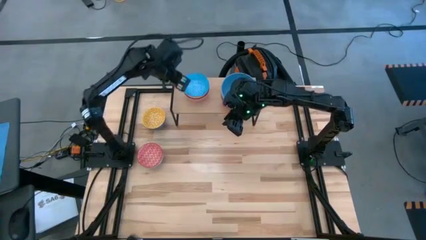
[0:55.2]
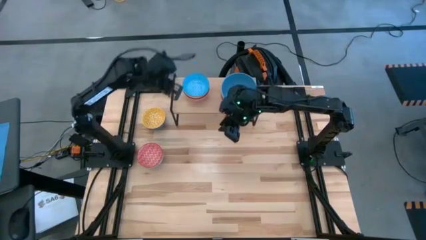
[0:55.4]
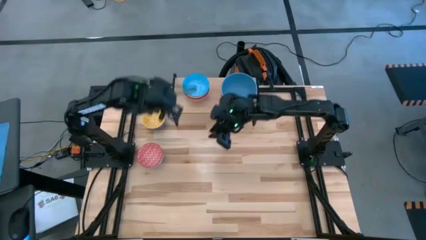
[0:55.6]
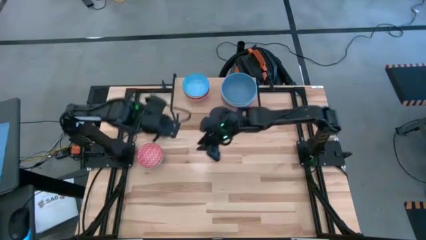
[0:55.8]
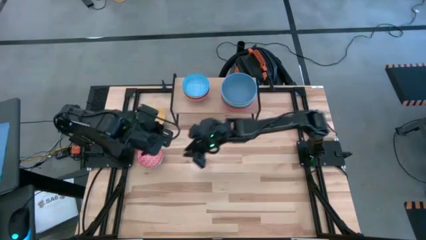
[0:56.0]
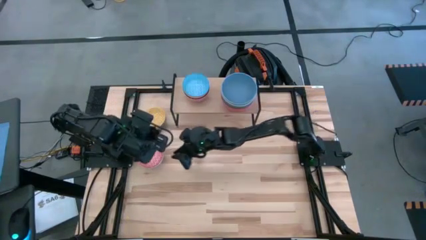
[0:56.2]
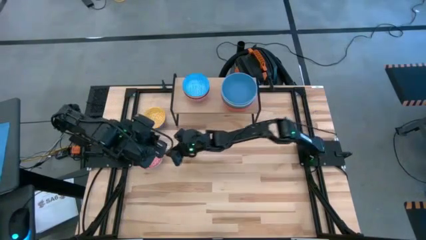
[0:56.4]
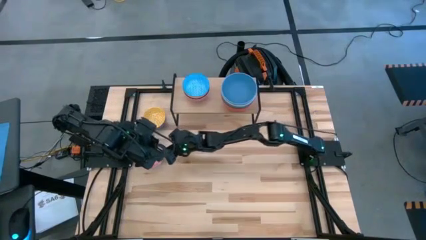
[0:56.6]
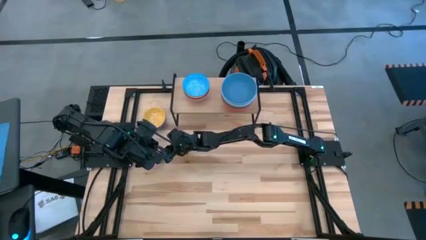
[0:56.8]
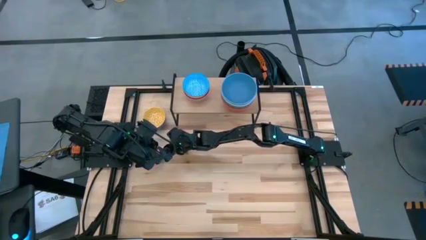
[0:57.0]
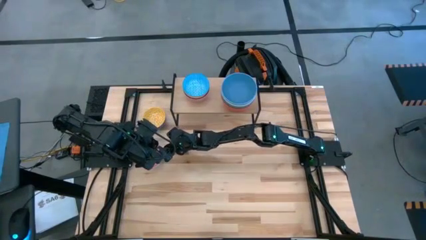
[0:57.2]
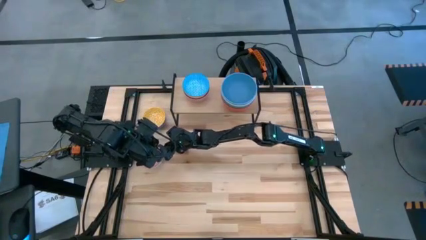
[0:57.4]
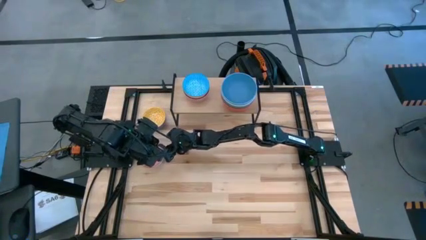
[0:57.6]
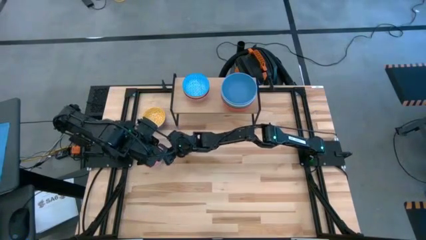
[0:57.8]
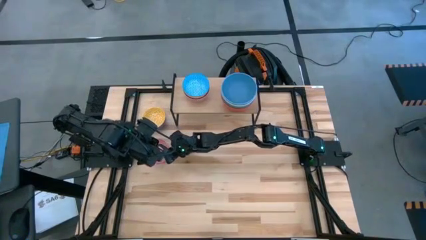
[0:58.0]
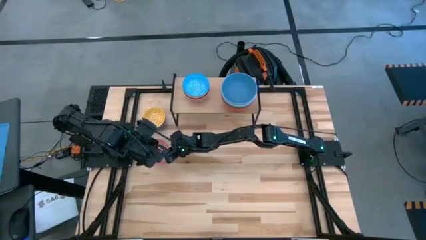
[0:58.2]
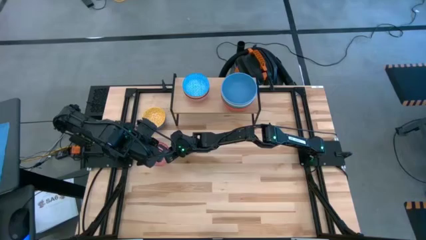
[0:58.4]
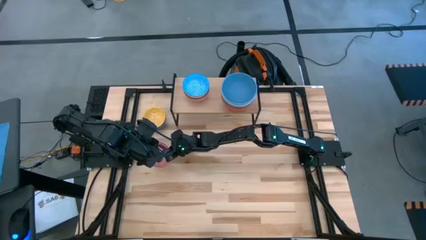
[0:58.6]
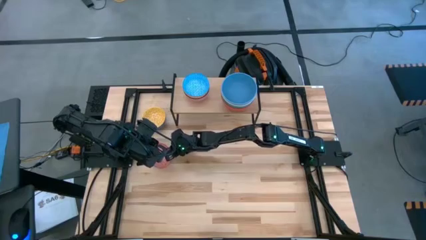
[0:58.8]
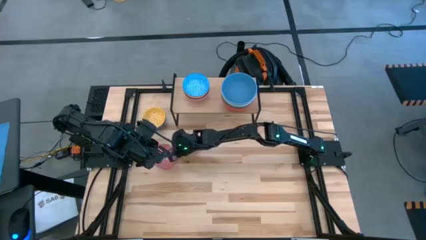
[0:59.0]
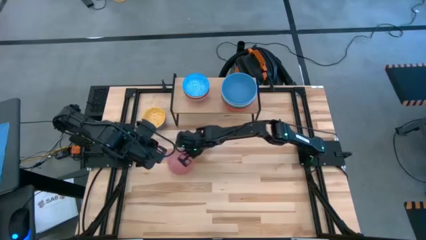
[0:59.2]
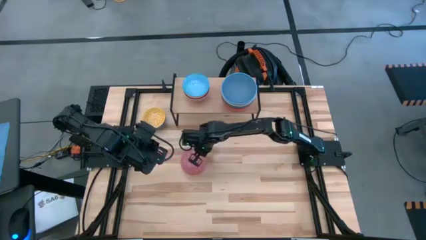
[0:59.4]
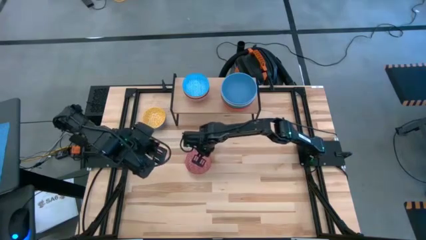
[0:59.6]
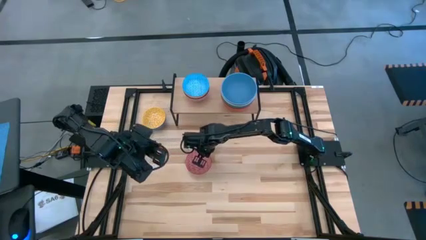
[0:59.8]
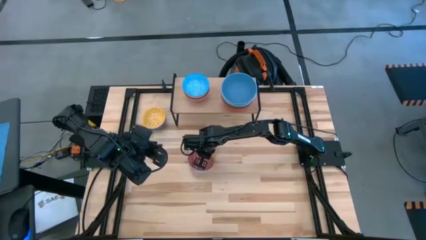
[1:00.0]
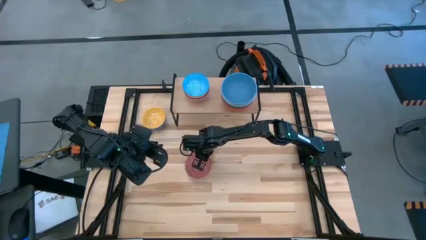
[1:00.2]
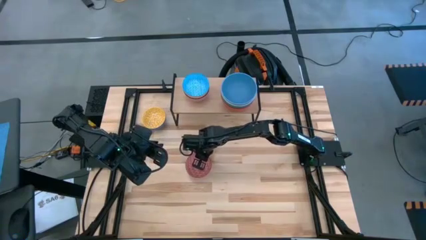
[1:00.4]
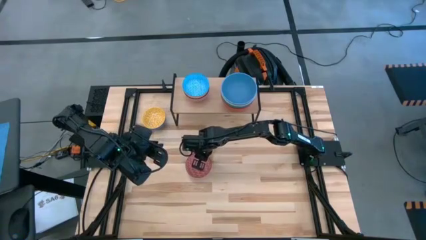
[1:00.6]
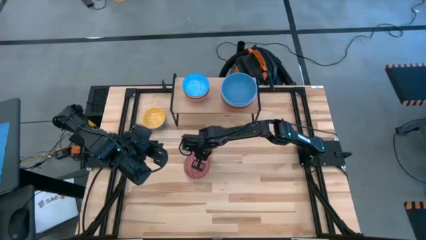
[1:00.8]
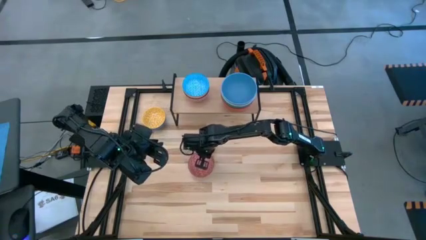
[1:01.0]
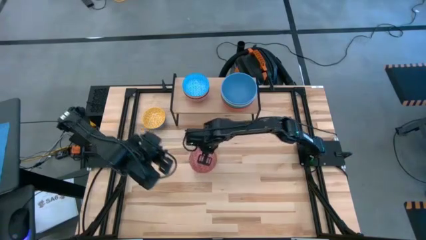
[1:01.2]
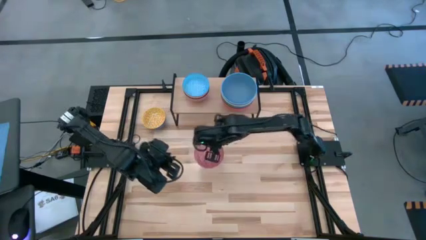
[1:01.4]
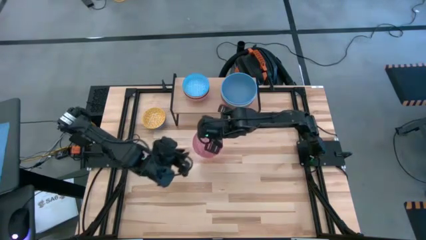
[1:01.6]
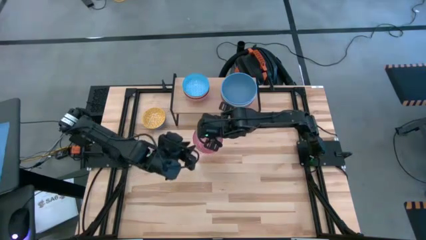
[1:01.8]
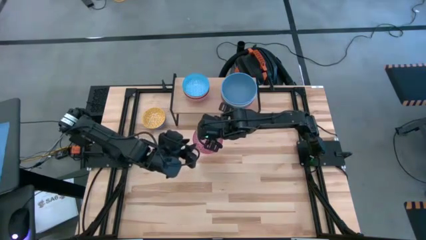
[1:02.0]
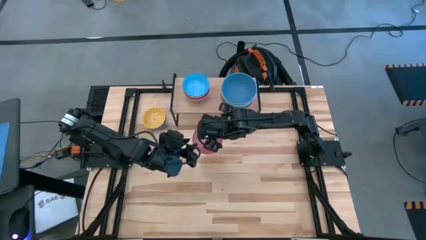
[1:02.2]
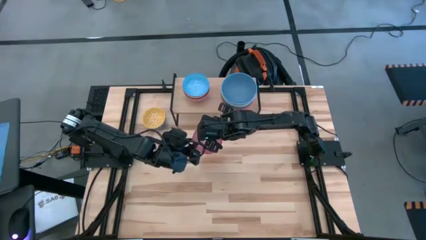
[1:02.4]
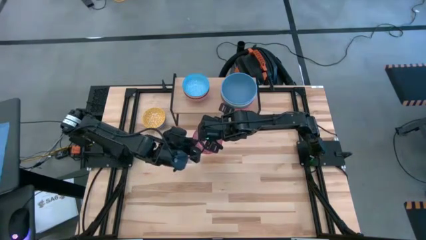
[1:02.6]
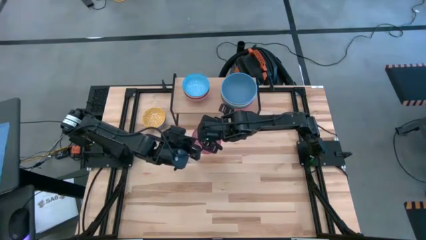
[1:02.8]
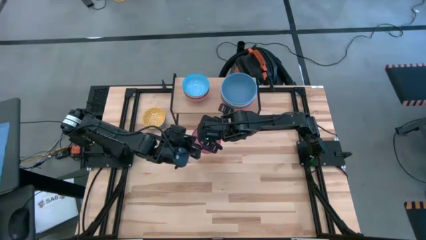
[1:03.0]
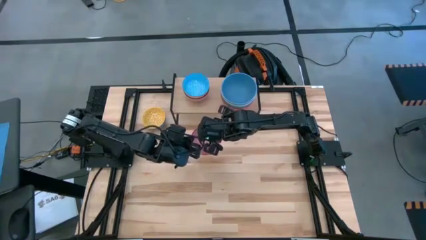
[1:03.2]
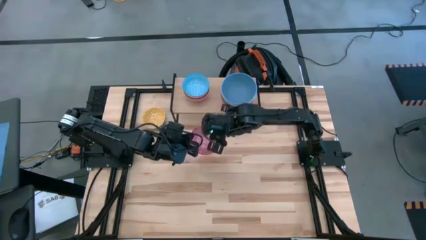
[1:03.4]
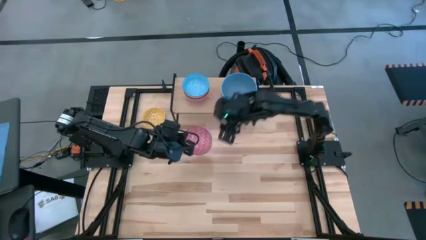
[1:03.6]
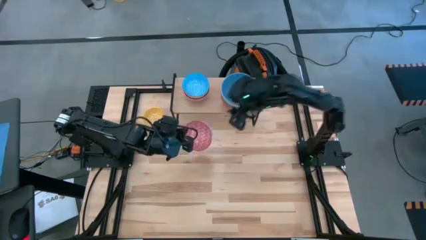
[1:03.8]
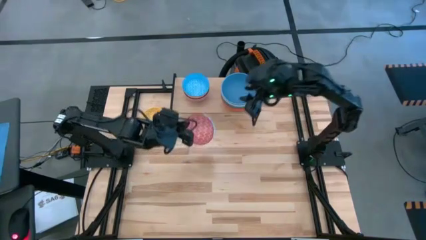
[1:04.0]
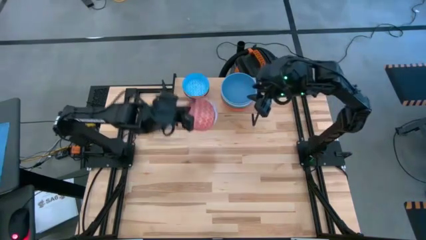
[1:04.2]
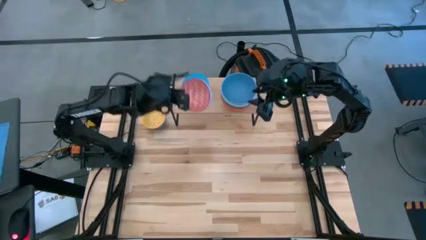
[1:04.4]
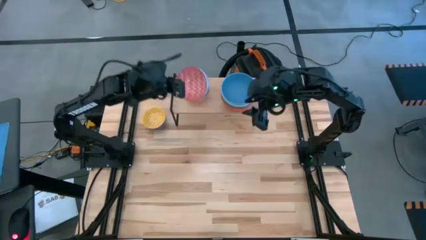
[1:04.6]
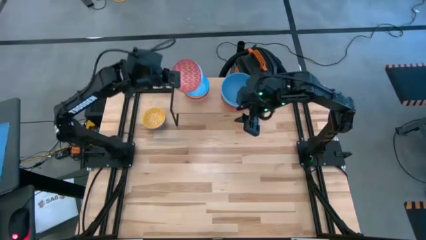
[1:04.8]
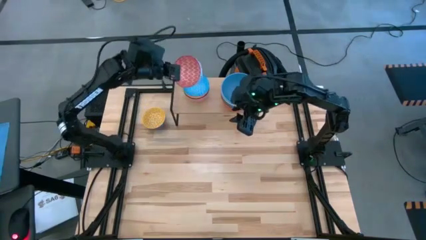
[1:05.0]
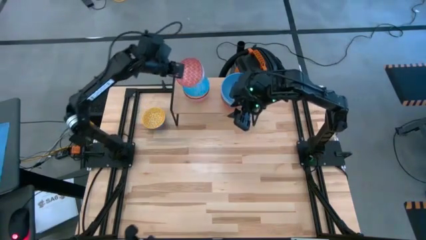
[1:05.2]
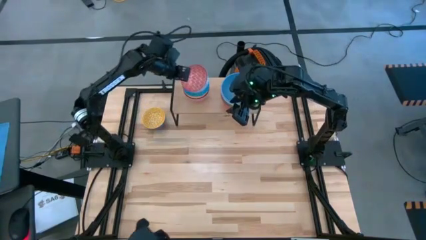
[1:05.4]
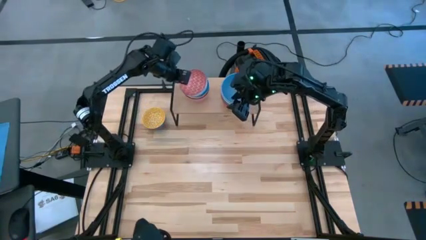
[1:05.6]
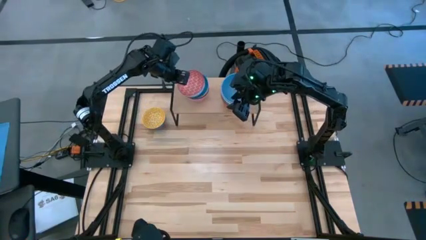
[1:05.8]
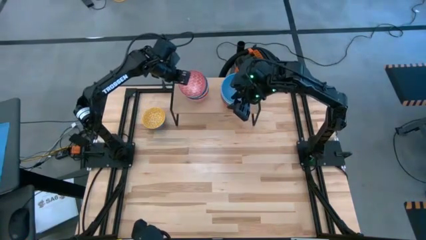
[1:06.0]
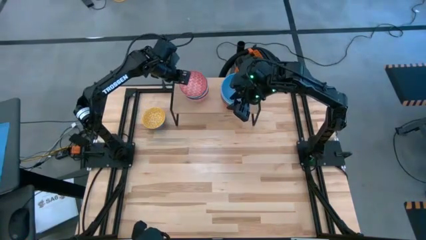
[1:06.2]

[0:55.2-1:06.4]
Task: Place and stack bowls onto a shelf
Stack the blue-red patterned bowl on top of the yellow-blue patterned bowl on the shelf

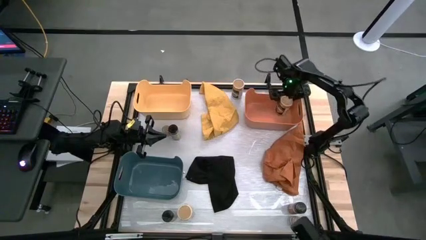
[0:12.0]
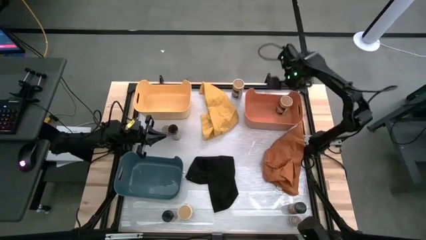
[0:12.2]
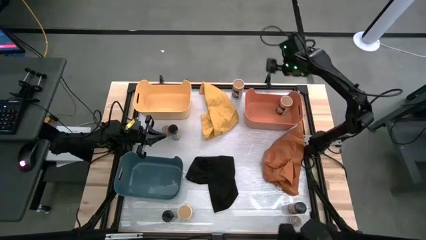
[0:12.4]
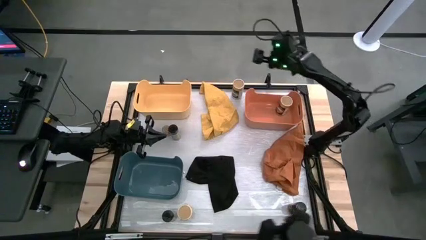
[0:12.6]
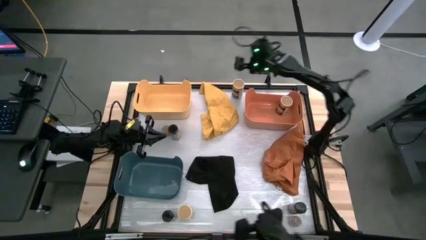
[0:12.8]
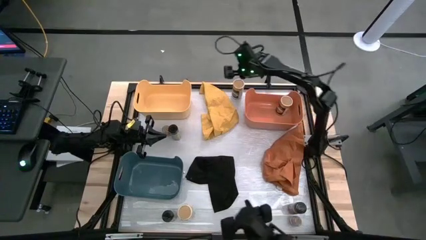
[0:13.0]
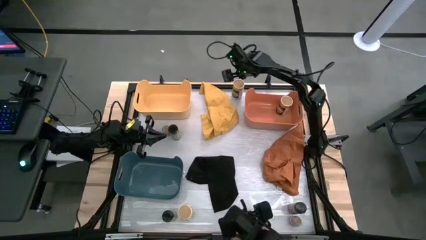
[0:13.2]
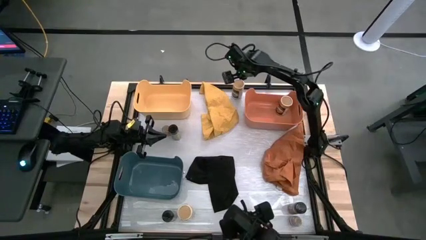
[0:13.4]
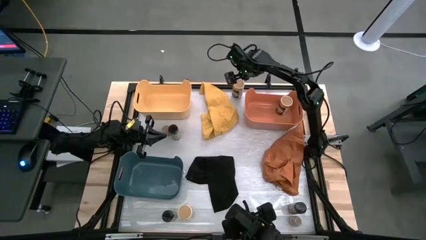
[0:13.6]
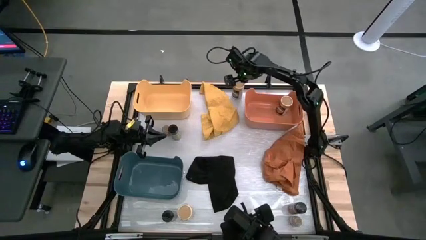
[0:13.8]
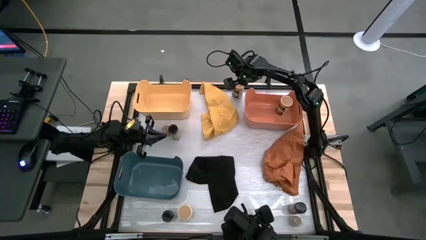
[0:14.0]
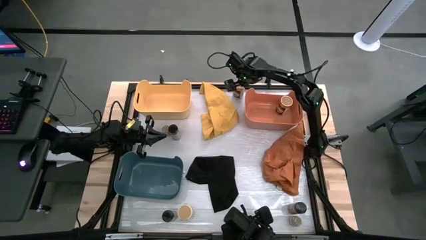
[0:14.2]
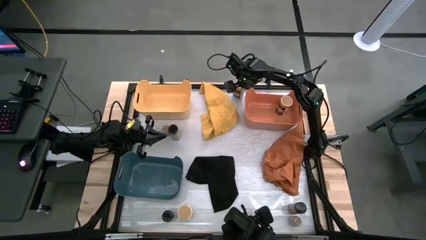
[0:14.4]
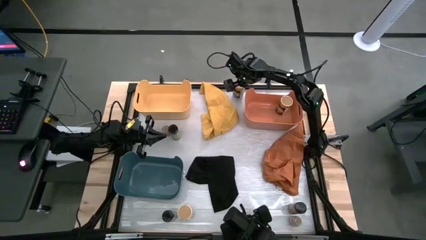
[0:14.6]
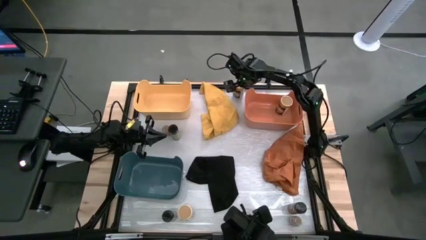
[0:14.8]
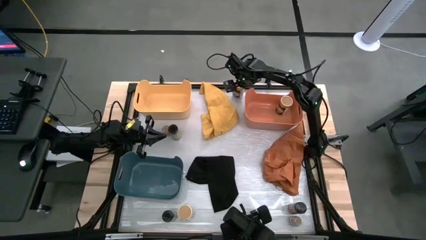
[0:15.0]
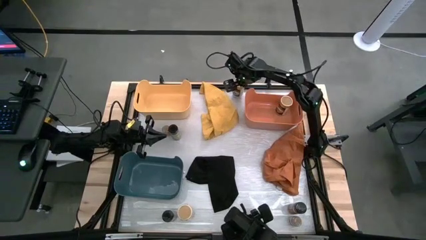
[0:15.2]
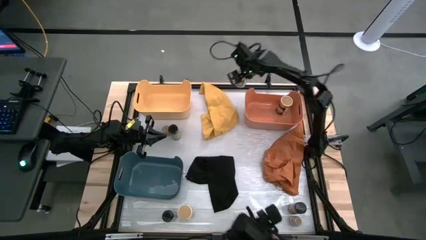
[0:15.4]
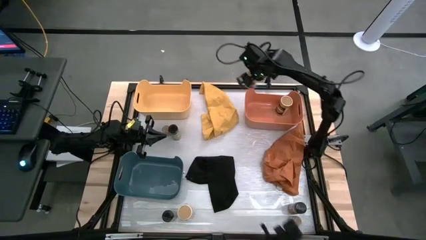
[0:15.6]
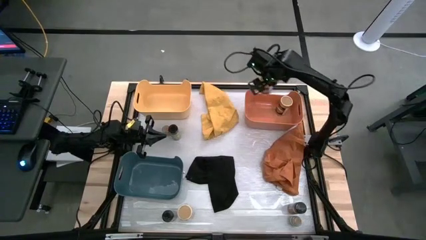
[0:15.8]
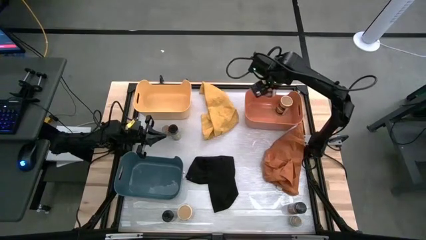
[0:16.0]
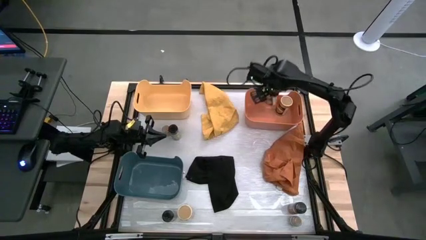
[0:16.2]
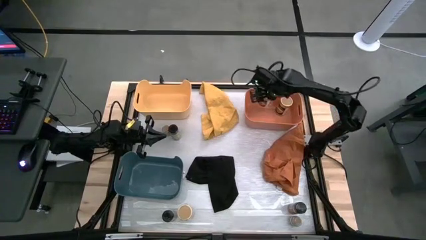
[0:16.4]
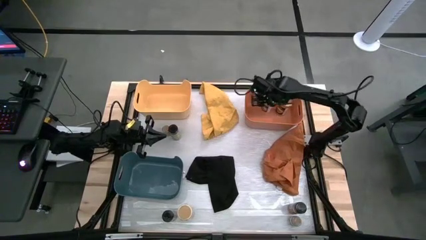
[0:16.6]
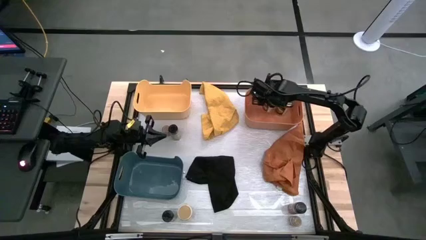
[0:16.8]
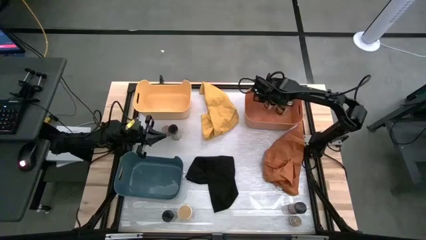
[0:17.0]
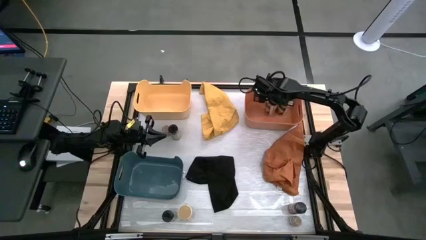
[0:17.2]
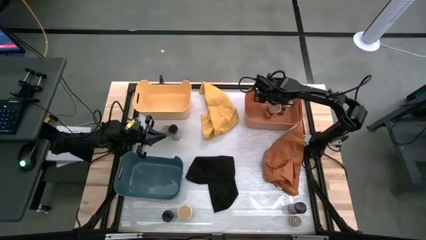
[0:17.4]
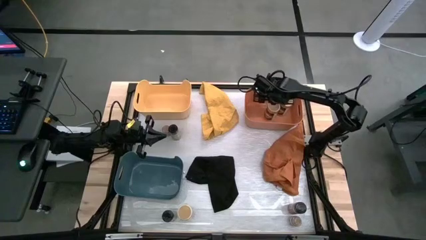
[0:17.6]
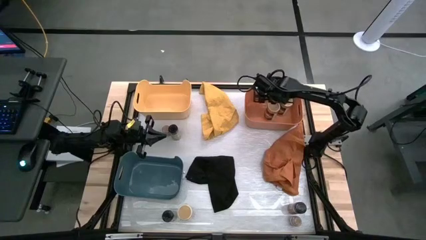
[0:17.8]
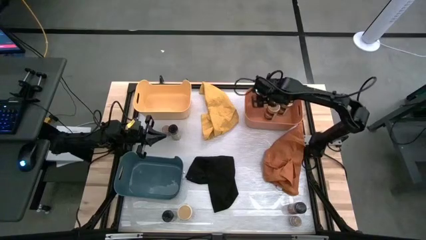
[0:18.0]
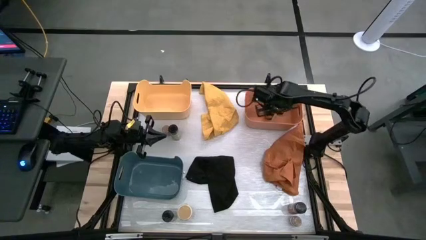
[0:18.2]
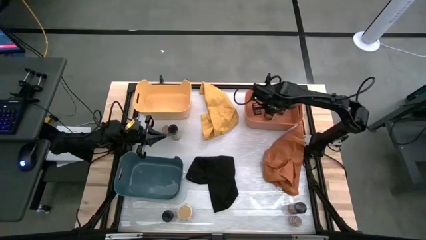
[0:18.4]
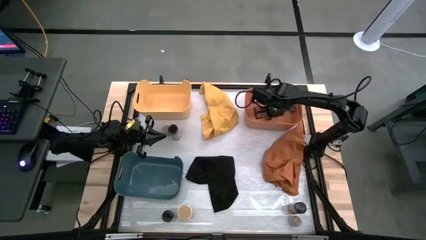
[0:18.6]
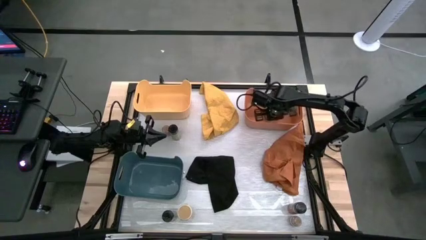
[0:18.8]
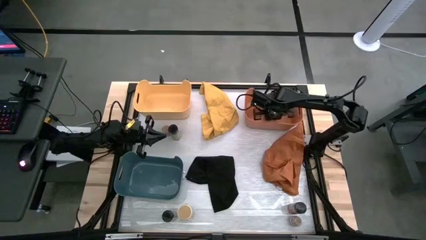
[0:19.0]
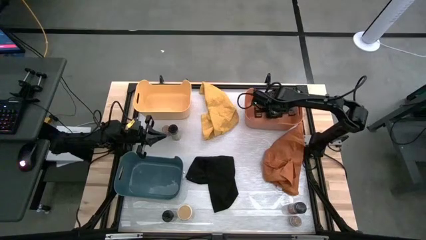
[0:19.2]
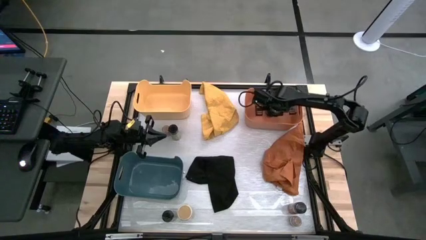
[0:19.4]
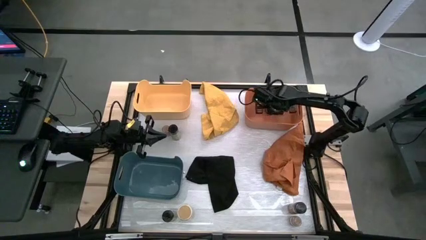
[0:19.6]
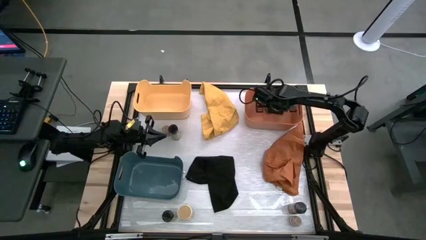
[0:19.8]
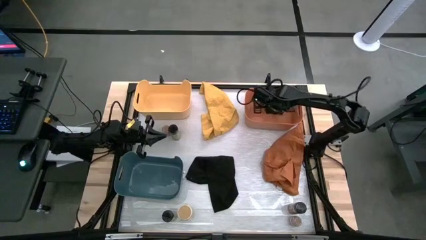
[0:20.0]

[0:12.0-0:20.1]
Task: Sort spices by type
Put the top gold spice bottle into the orange bin
